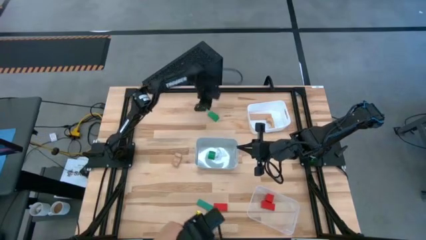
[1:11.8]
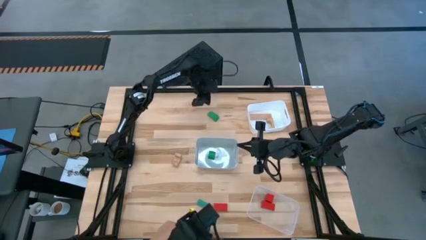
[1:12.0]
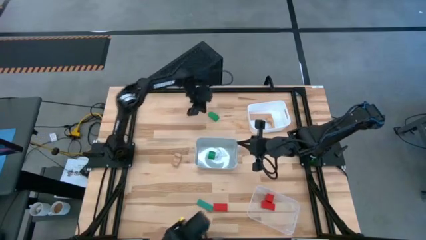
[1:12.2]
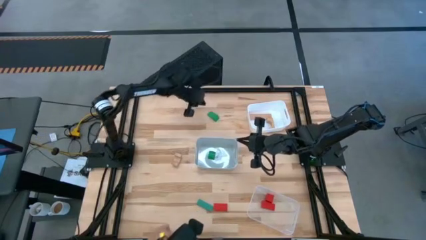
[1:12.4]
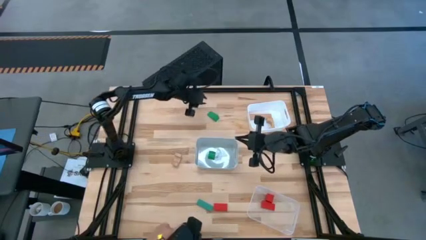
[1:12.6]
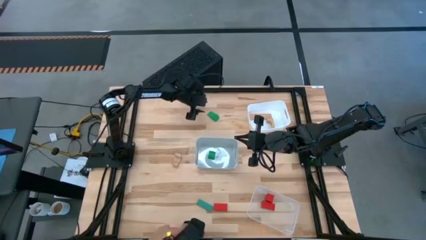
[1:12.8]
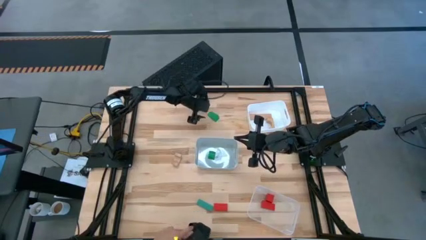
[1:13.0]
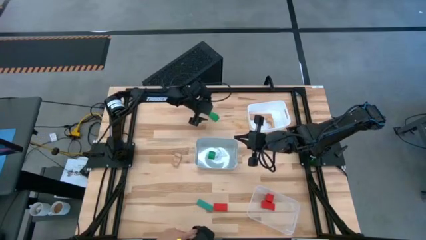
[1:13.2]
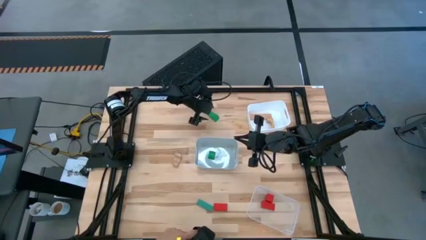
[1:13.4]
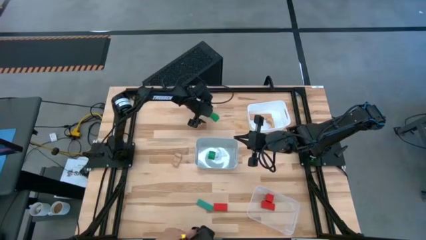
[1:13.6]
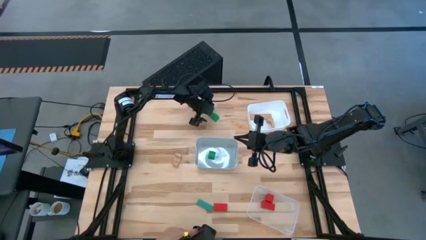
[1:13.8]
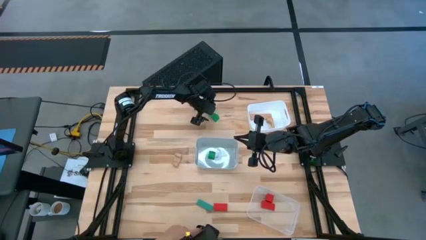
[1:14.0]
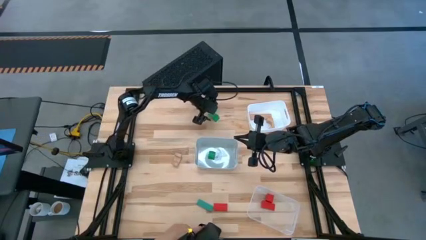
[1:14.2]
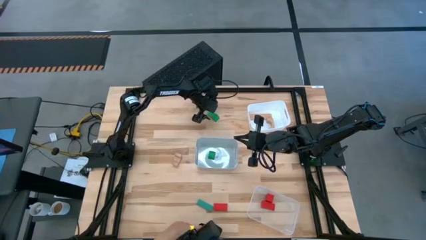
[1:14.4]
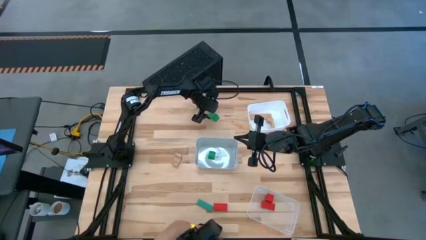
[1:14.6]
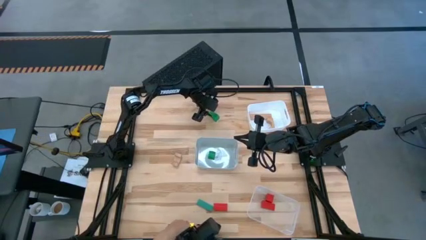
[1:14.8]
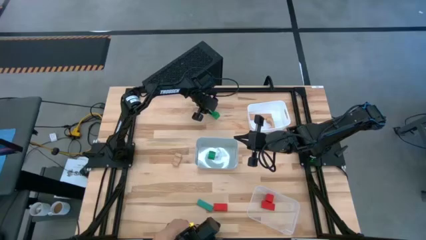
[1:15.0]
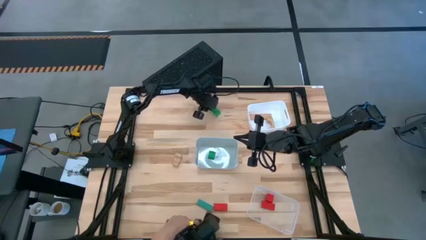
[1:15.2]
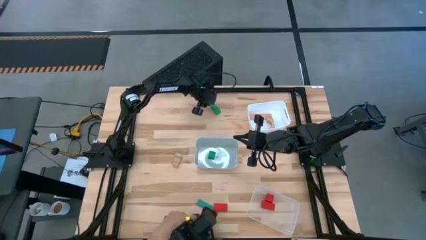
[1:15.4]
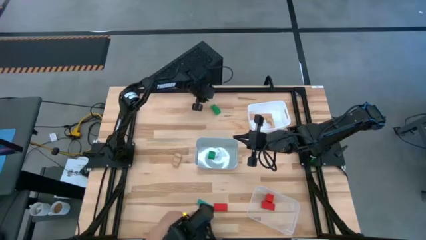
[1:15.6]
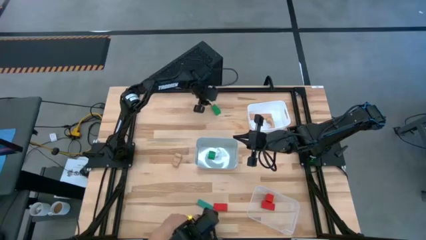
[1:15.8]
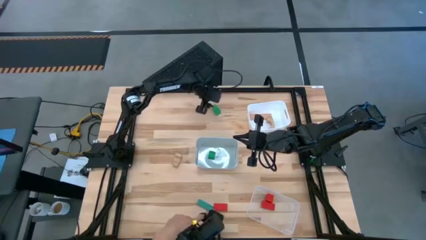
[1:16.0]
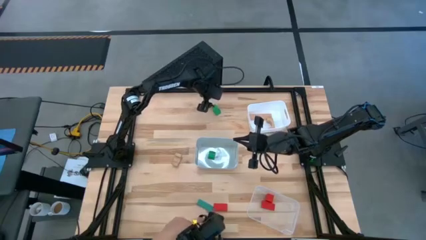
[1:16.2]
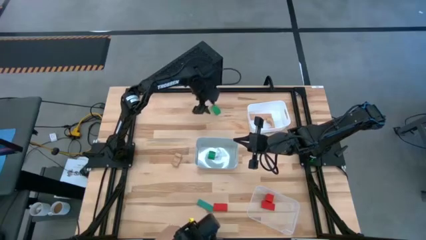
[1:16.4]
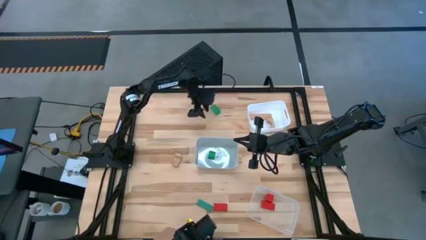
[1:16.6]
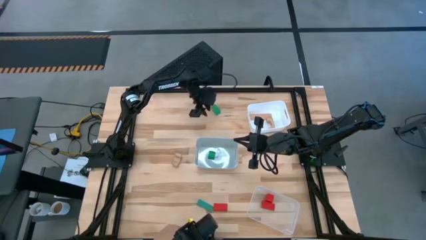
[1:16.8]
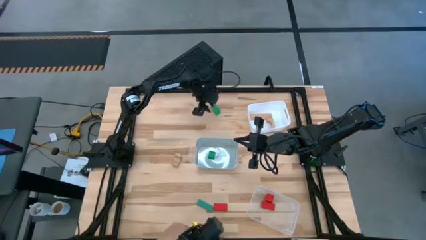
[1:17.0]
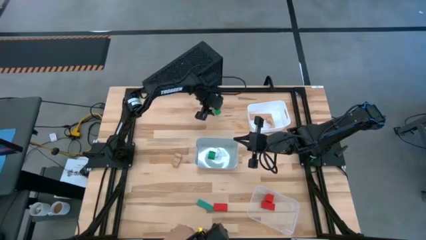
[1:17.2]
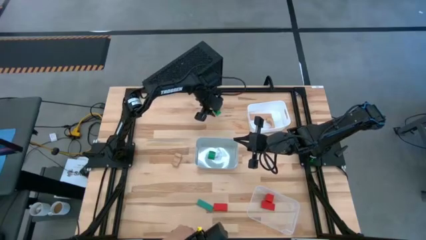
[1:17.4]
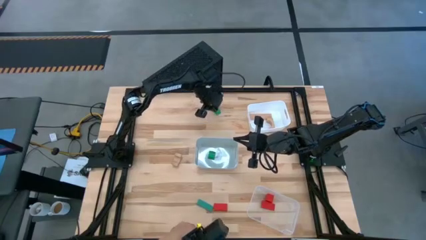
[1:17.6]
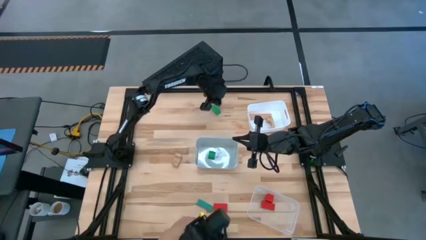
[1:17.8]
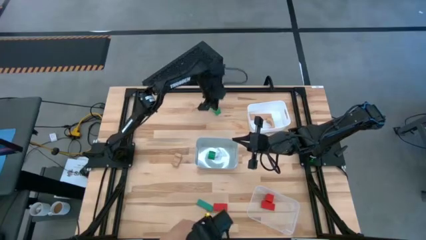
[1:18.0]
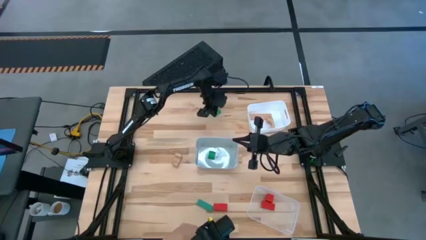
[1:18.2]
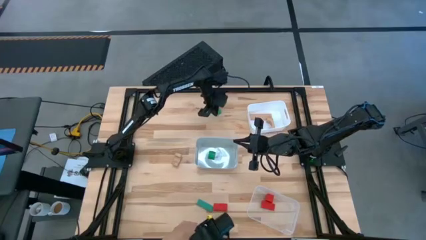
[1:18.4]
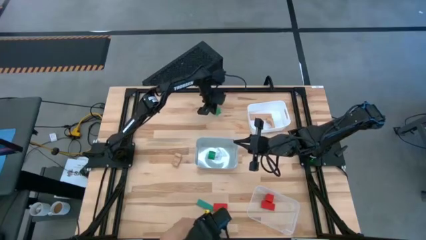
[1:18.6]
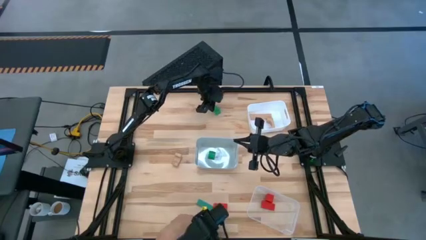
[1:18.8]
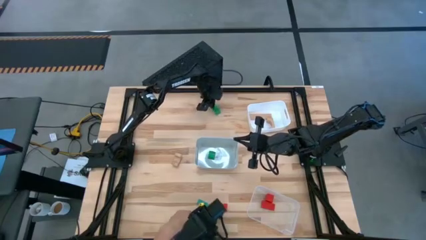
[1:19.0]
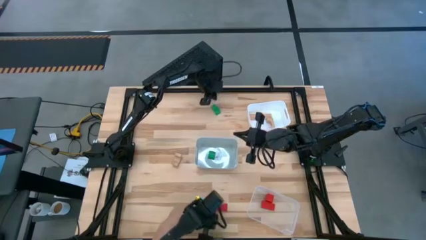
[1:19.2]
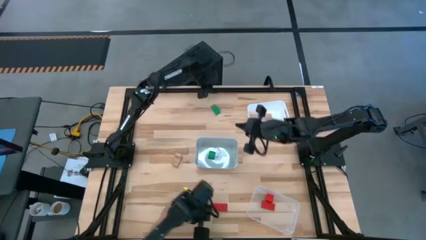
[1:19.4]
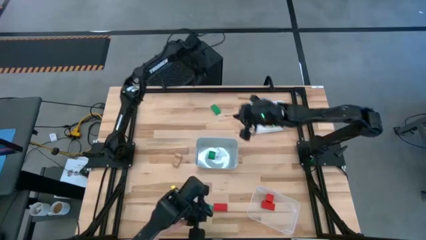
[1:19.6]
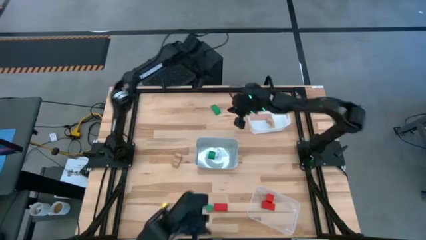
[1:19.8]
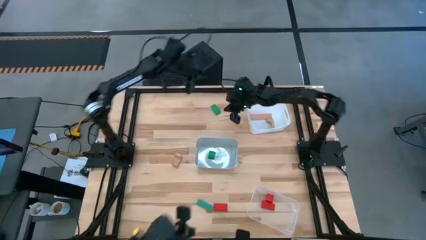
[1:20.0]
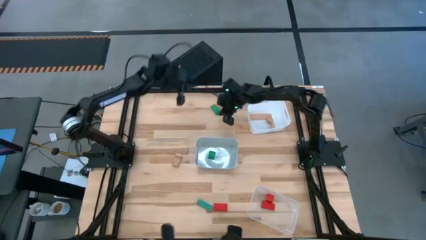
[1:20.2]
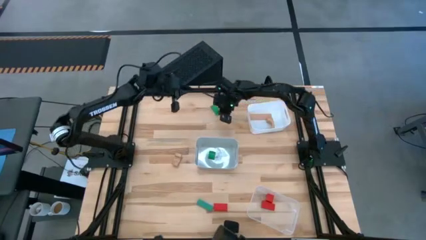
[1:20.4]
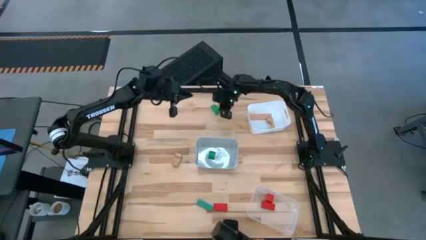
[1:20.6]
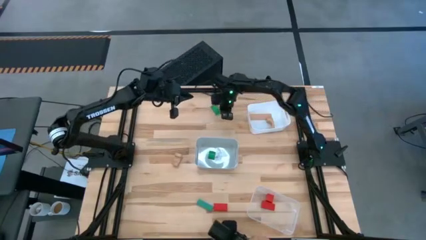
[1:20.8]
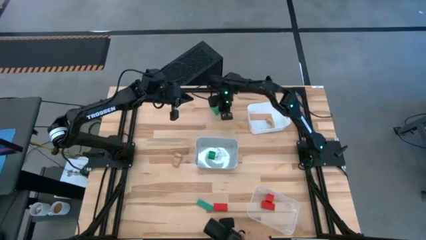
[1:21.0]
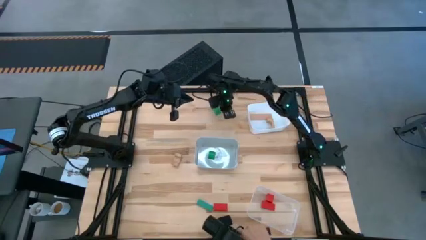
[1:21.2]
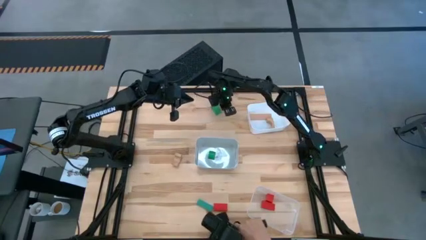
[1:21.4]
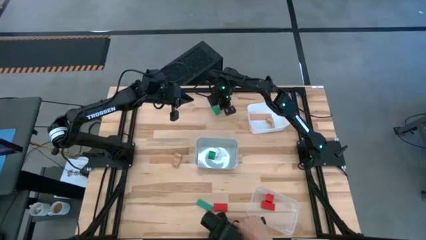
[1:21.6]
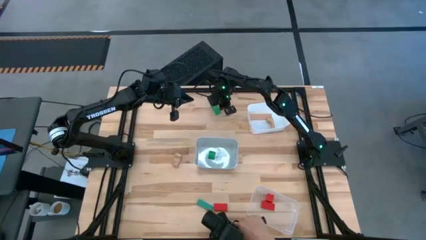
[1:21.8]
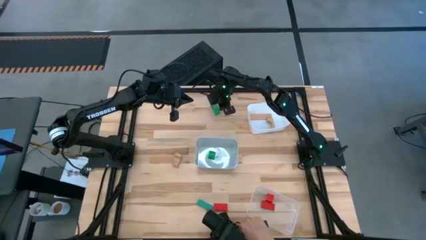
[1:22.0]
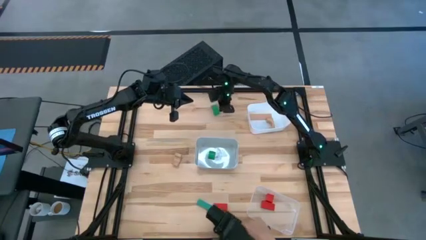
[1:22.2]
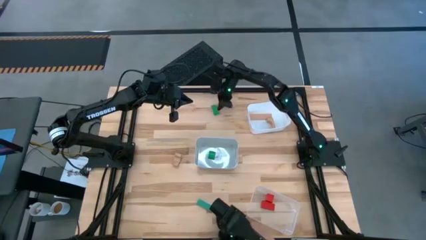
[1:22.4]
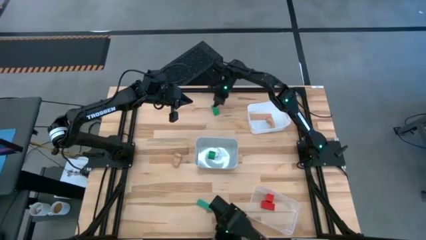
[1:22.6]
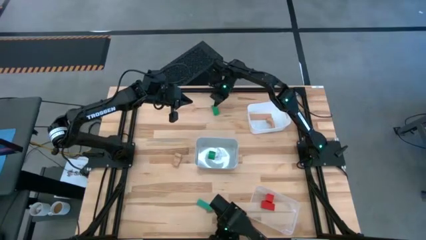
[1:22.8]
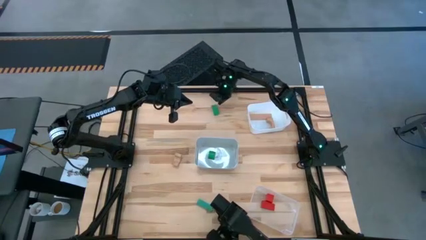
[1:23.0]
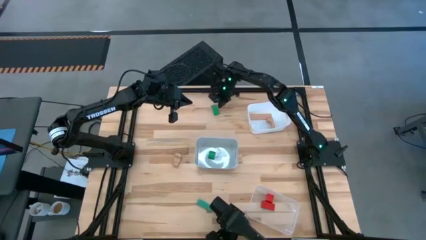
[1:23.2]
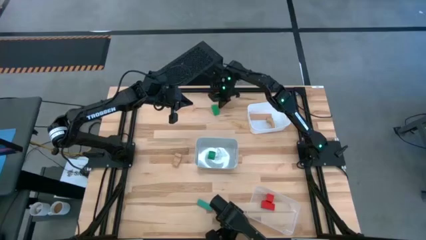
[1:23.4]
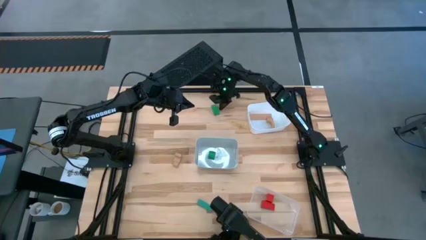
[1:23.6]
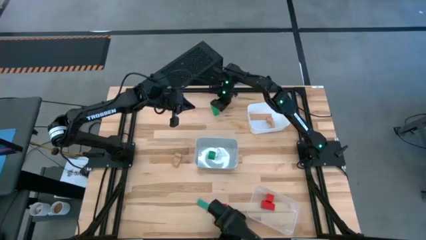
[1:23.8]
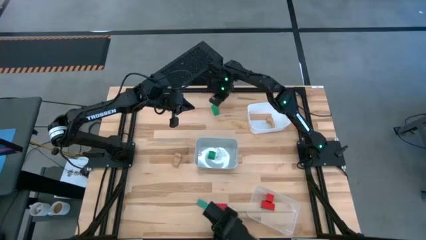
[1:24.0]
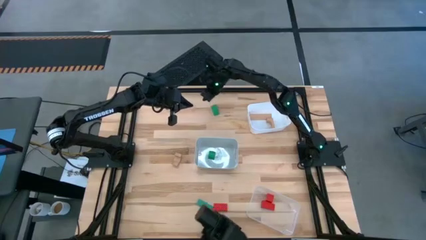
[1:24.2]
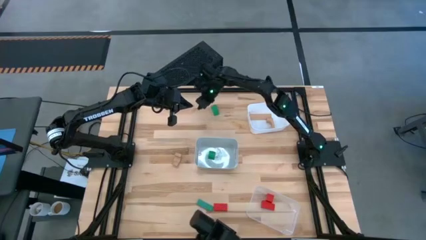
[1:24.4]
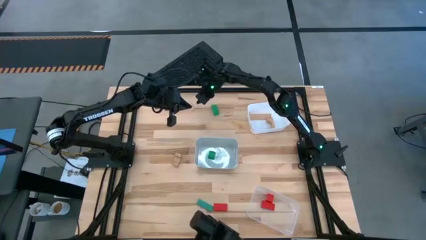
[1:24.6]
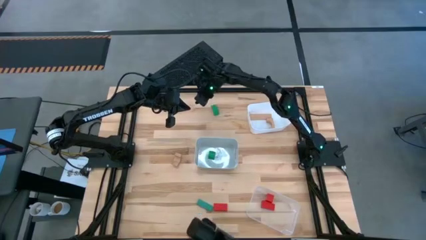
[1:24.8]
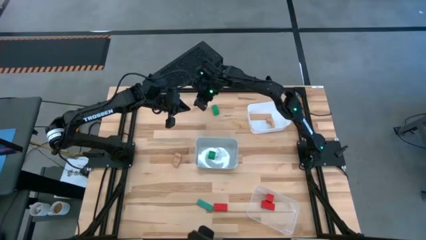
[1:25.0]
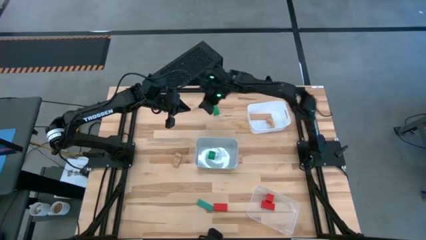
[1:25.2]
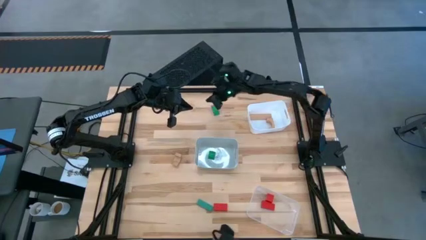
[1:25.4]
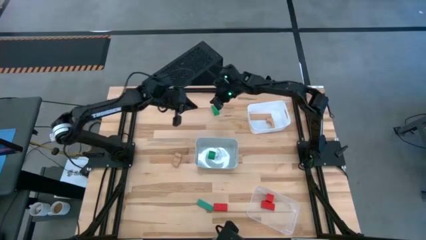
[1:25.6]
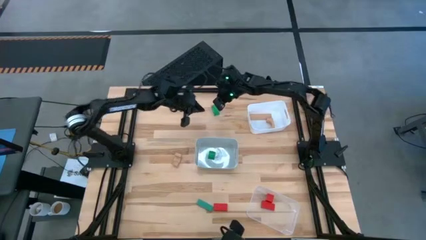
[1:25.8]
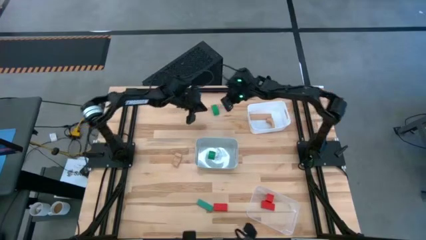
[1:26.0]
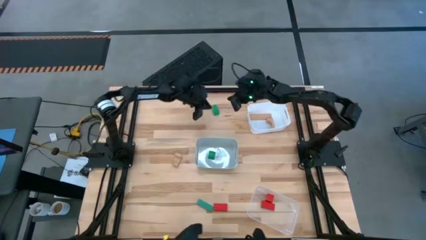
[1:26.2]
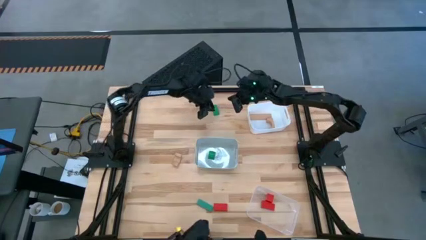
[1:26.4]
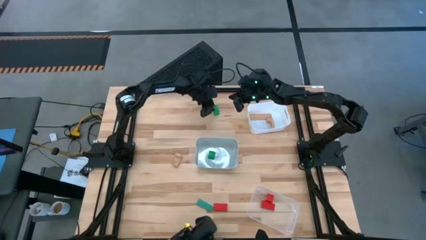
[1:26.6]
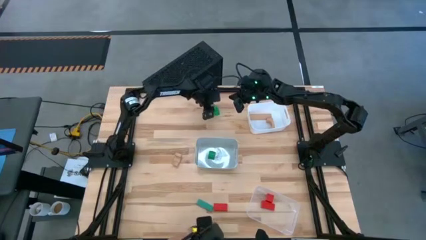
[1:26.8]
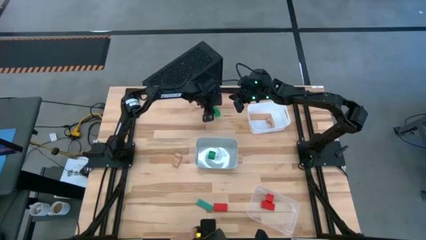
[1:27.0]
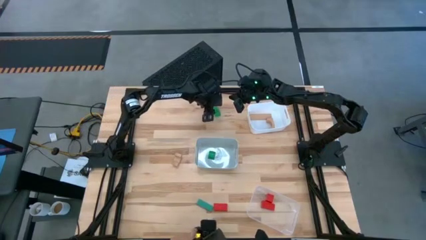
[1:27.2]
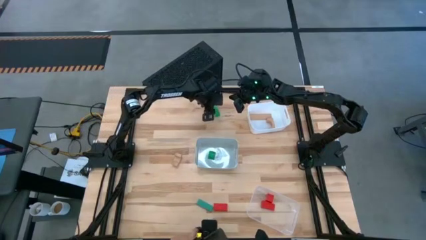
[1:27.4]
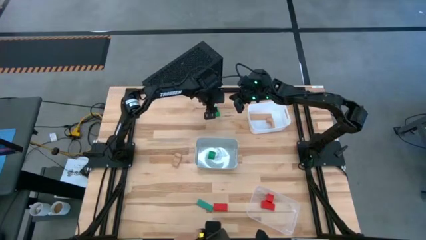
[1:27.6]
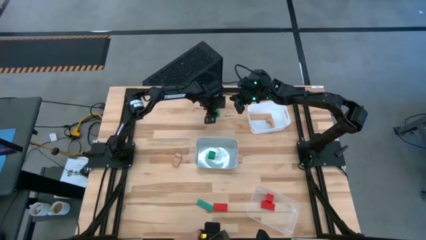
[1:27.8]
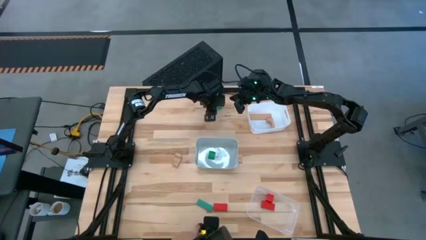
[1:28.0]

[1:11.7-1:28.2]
Task: Sort & place blocks by color
Put the top green block into the gray bin
